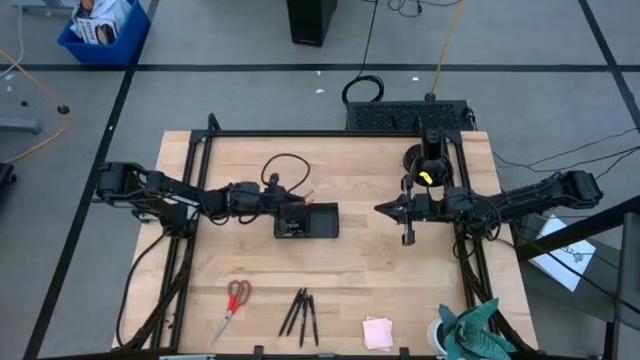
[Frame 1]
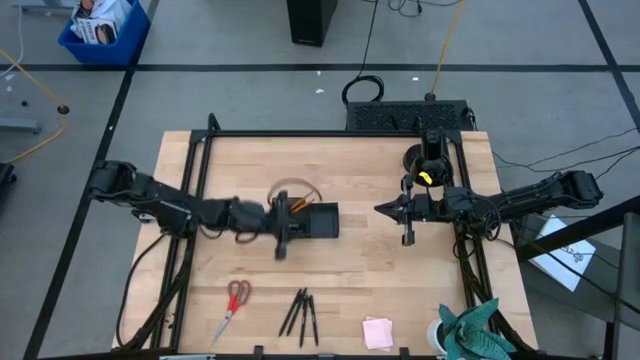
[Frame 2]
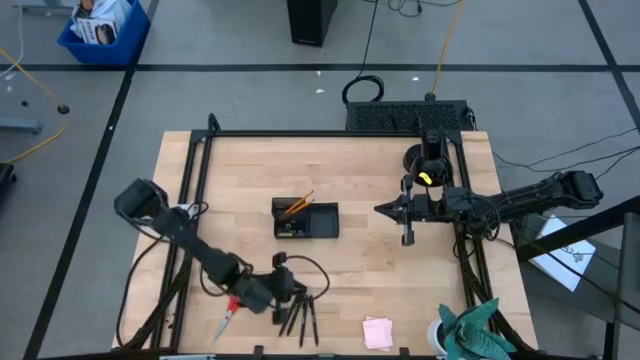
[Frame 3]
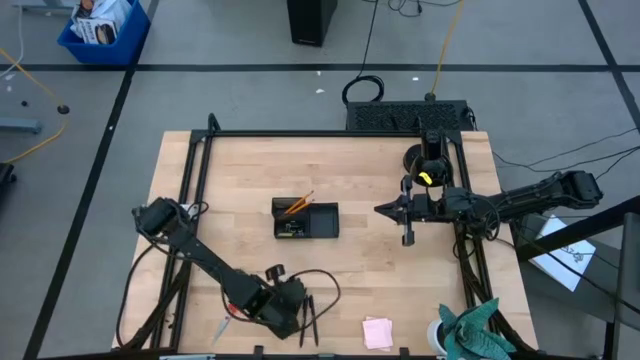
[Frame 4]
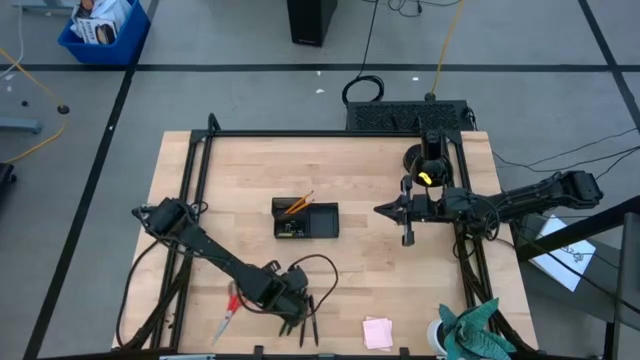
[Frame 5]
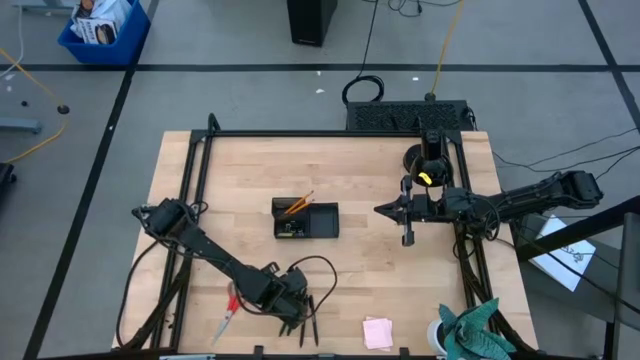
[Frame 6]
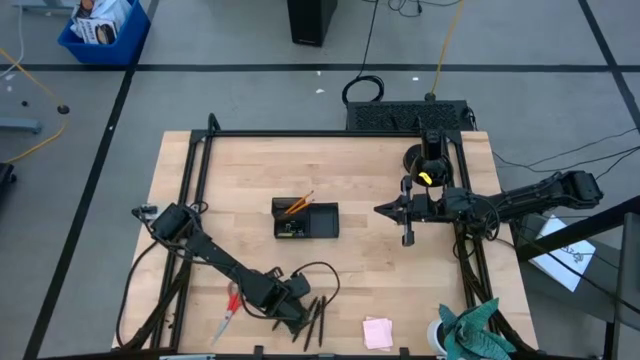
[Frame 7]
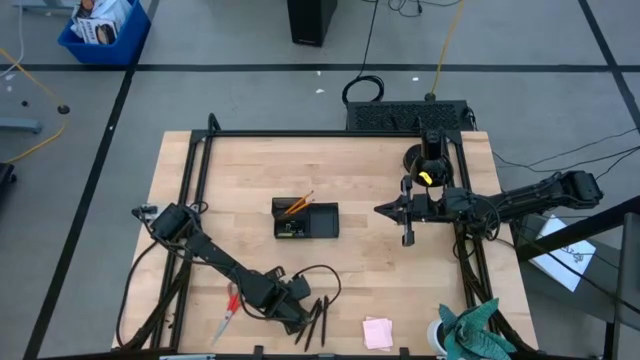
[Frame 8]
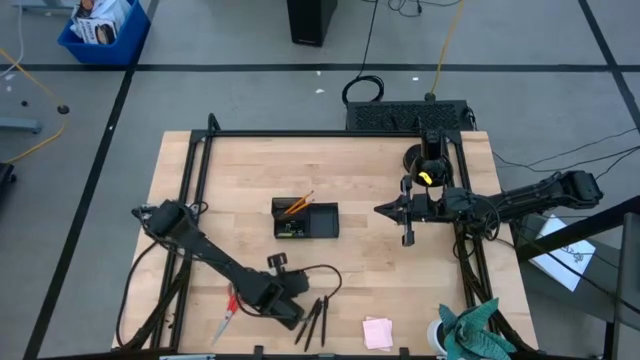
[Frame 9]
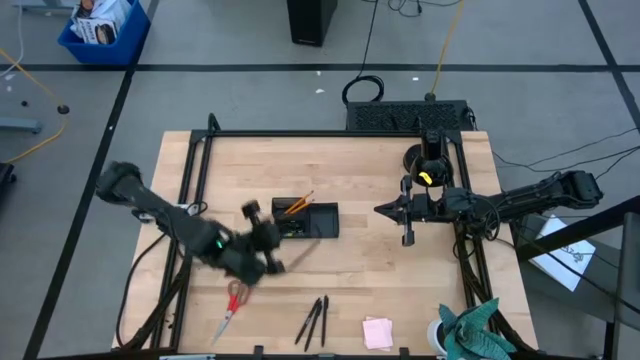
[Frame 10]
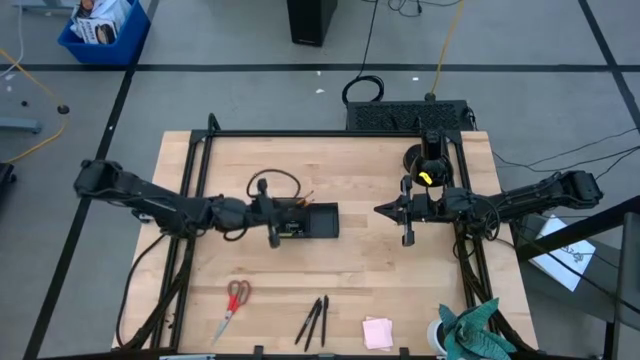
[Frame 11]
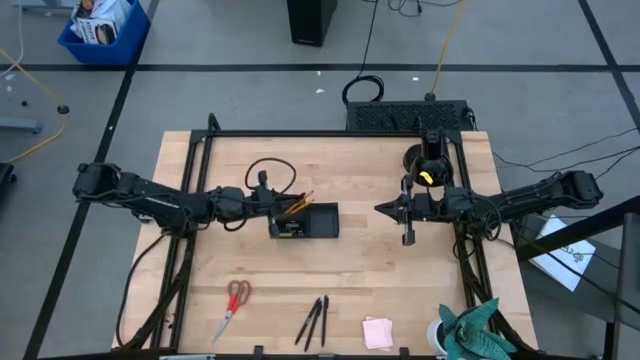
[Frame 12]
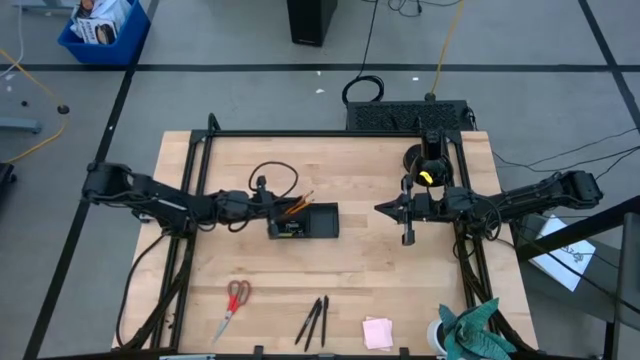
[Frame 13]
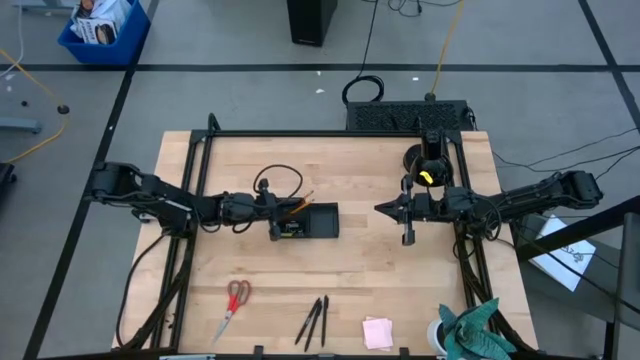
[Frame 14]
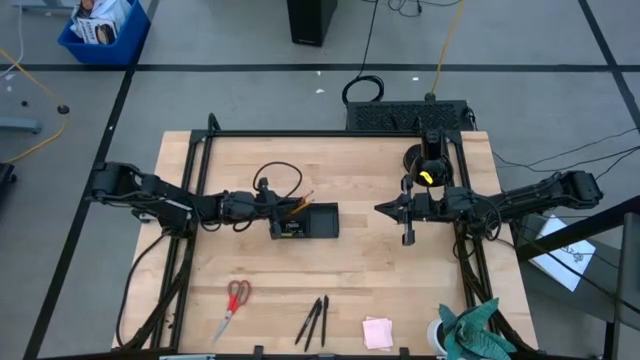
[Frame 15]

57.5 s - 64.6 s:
Task: Pick and place office supplies into organizer
Put the black pen into the black desk organizer

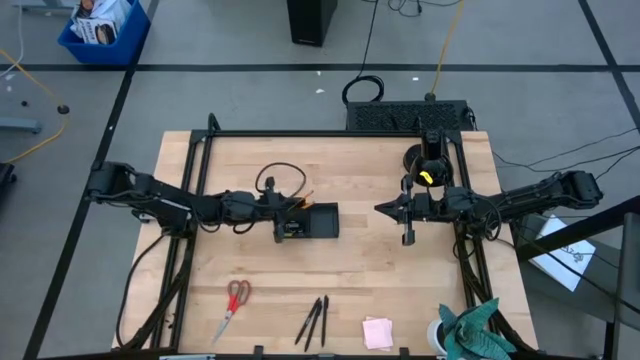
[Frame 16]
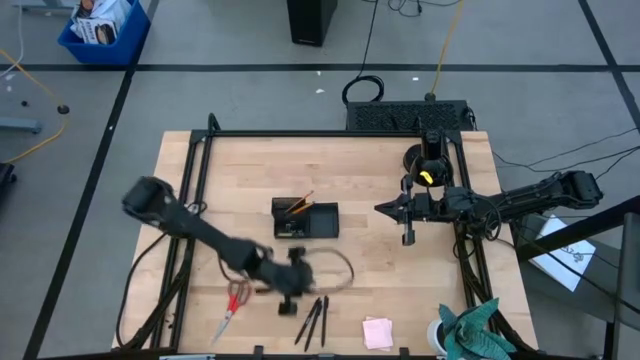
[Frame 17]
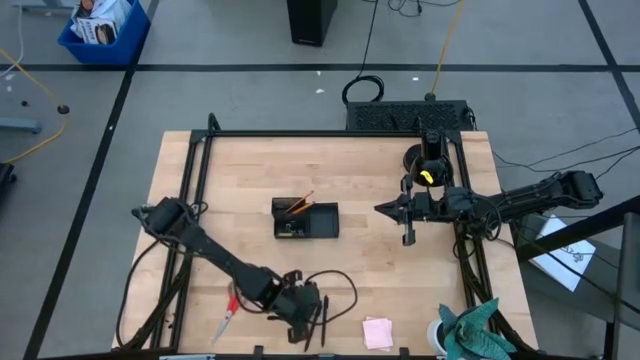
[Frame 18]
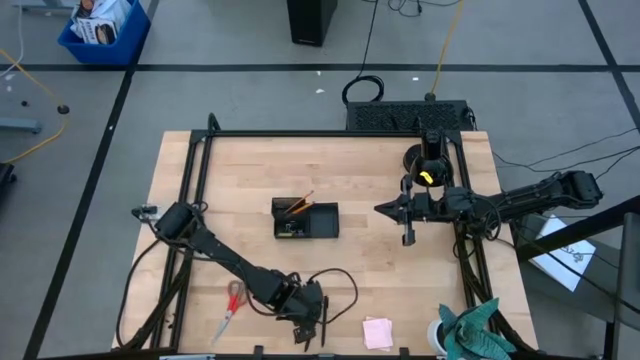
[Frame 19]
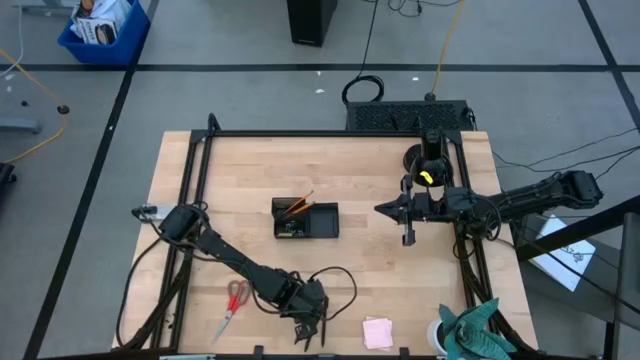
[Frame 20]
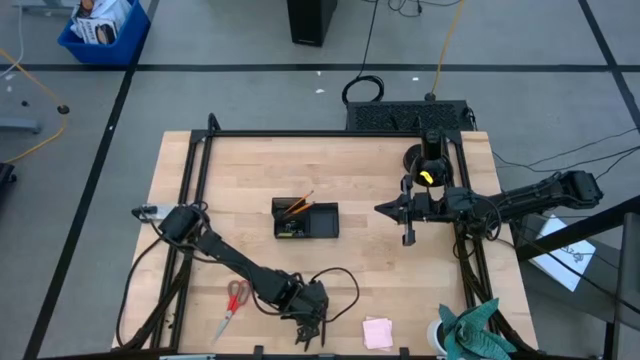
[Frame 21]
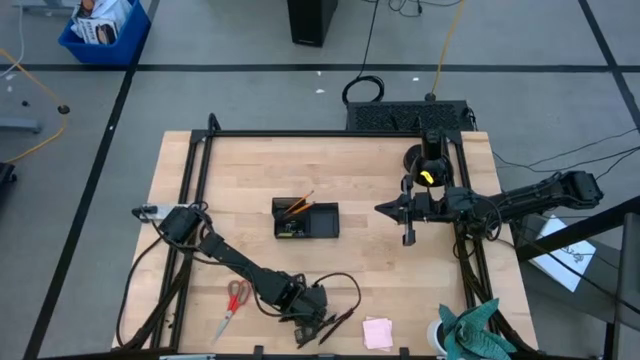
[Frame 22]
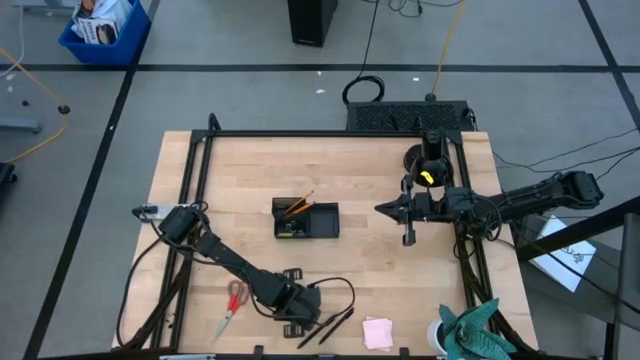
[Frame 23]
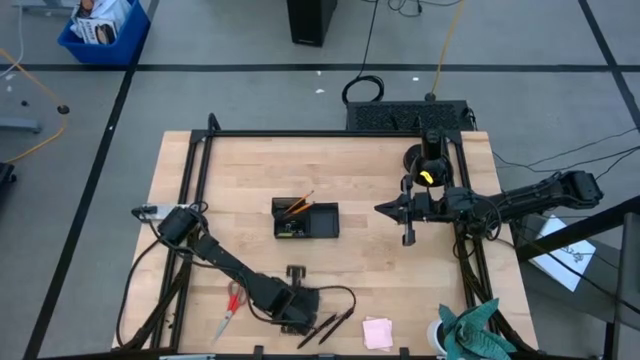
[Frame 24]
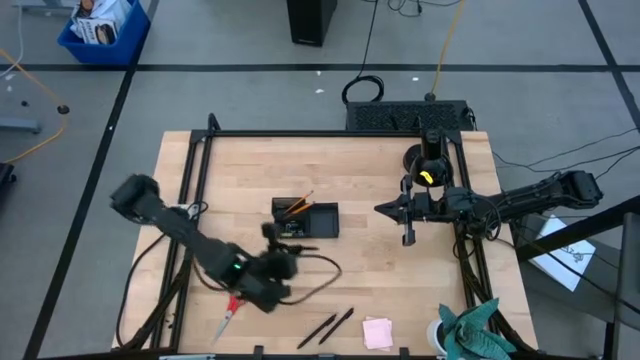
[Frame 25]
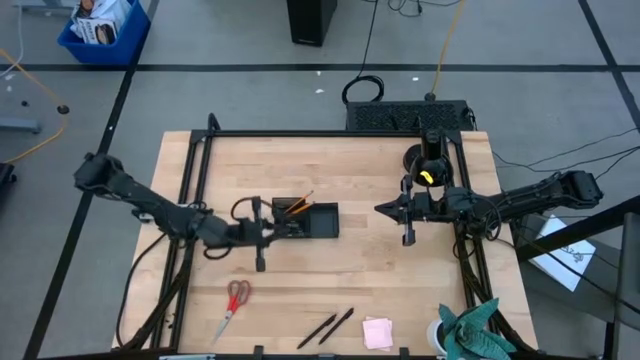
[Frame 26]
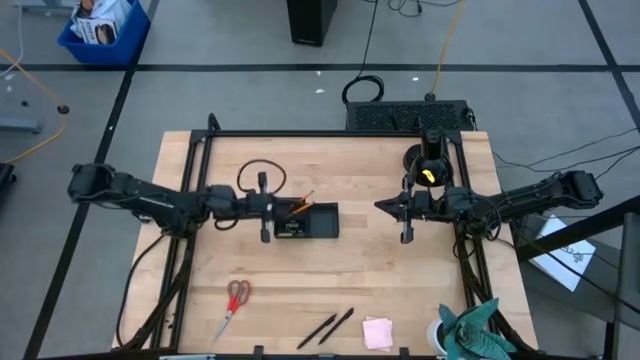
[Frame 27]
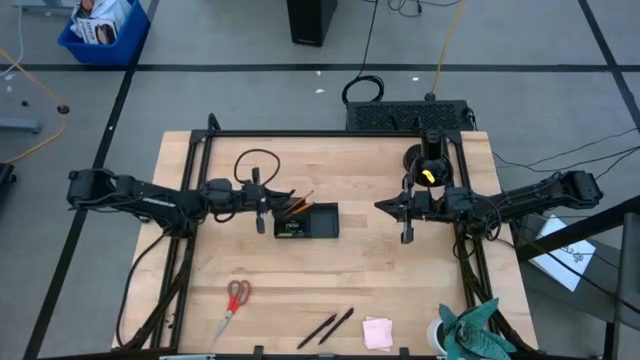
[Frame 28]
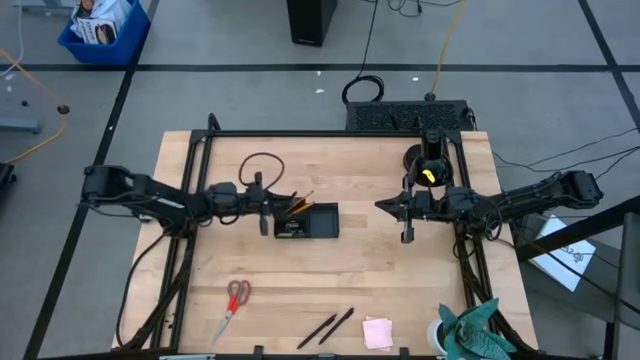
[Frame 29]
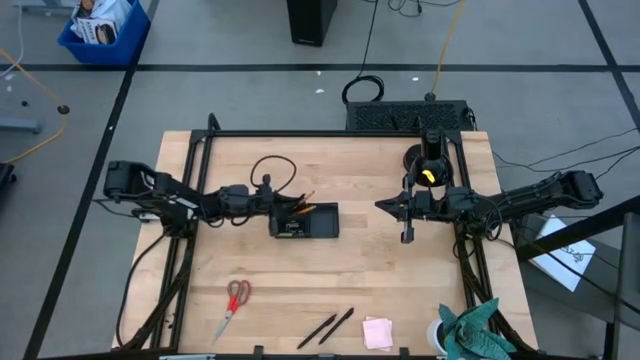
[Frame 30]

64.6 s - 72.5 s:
Put the black pen into the black desk organizer

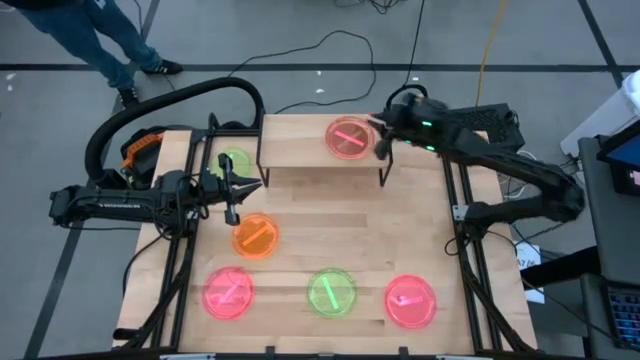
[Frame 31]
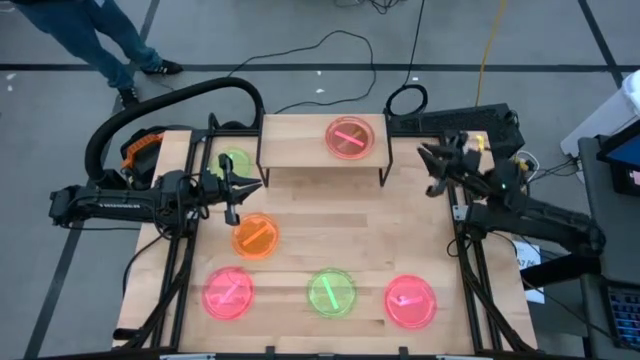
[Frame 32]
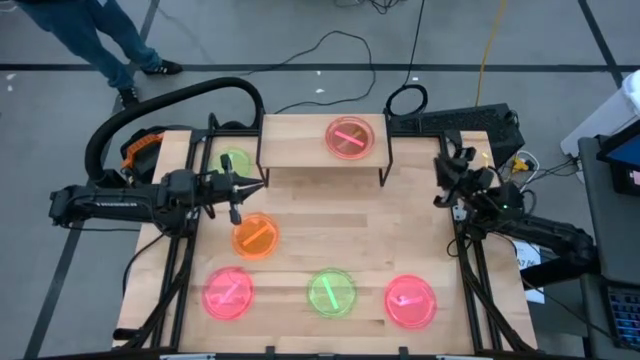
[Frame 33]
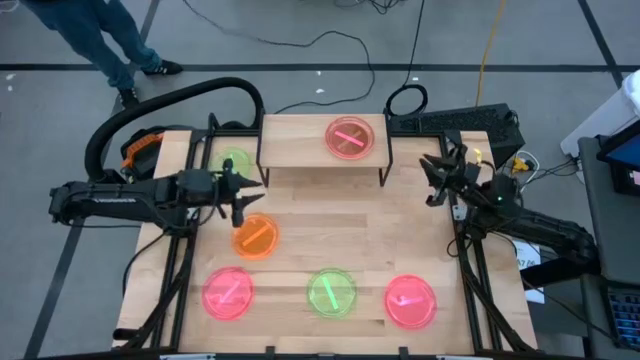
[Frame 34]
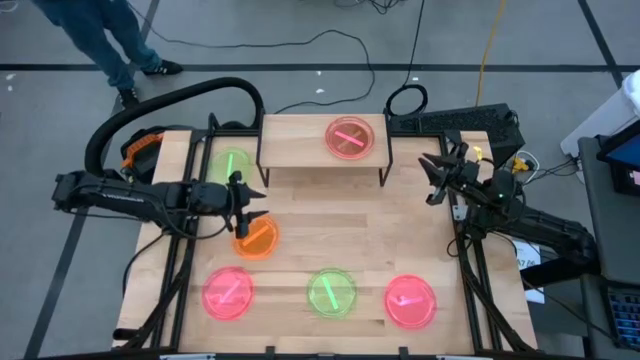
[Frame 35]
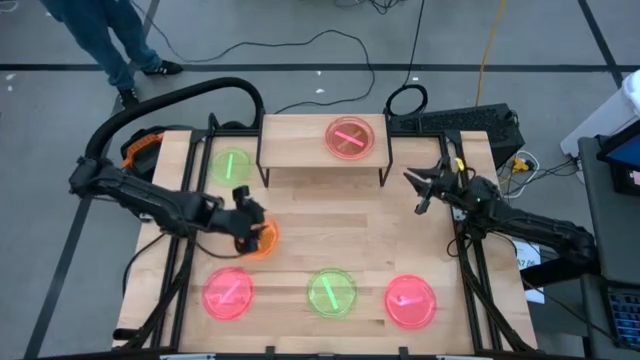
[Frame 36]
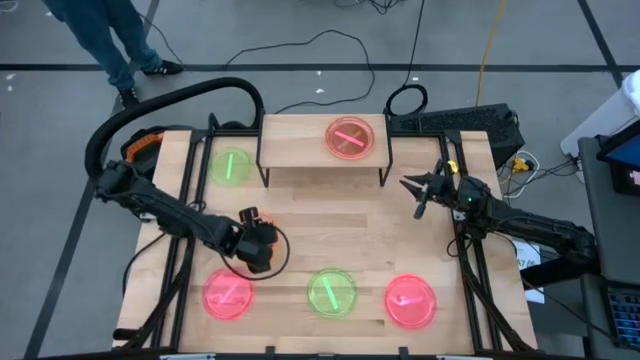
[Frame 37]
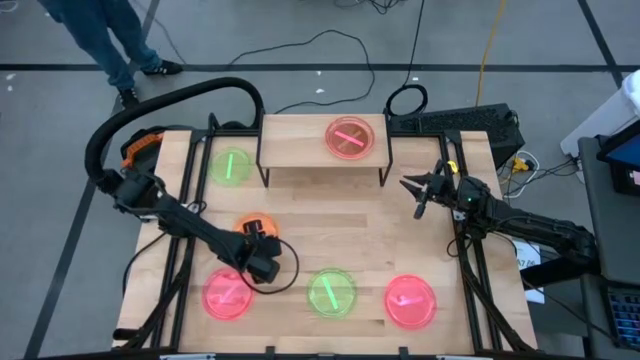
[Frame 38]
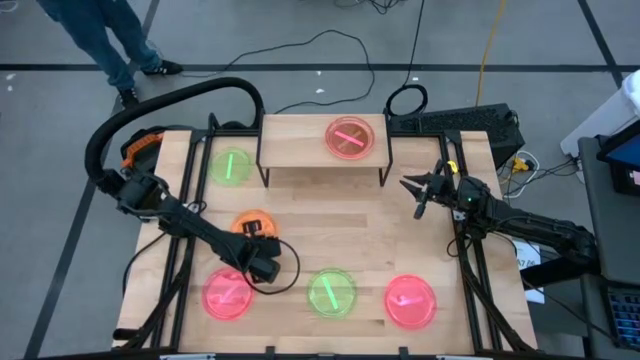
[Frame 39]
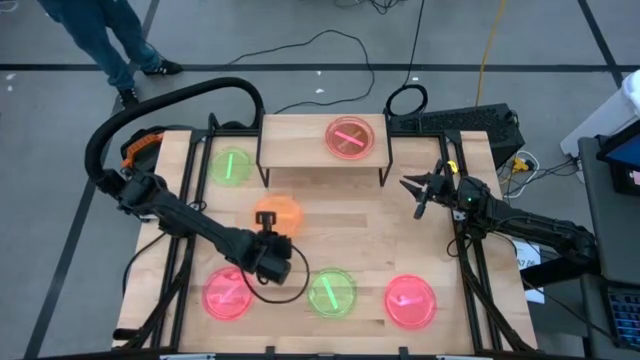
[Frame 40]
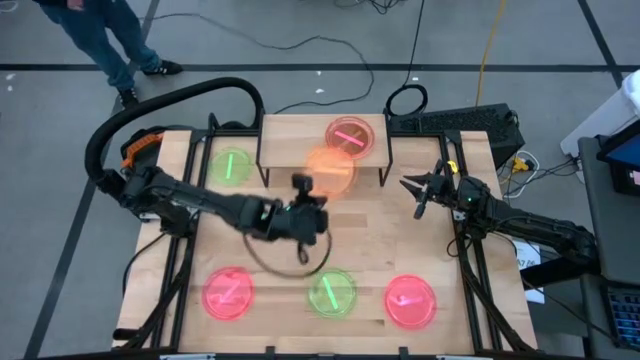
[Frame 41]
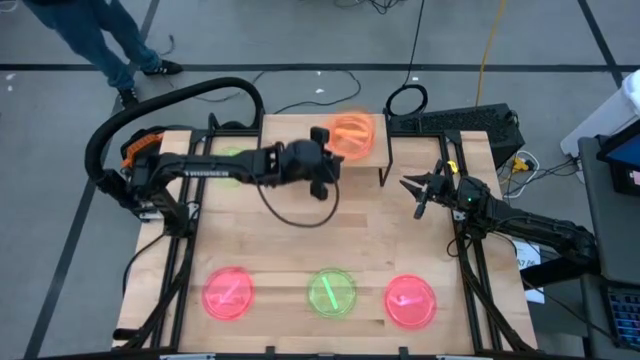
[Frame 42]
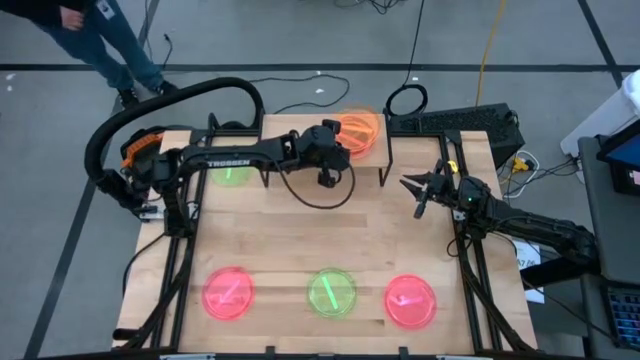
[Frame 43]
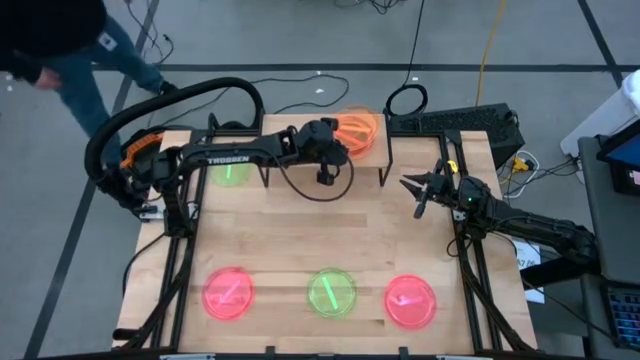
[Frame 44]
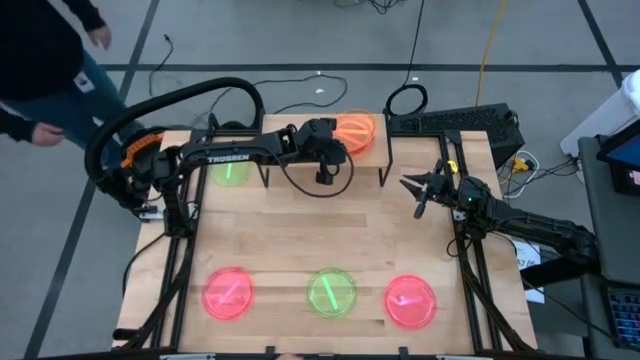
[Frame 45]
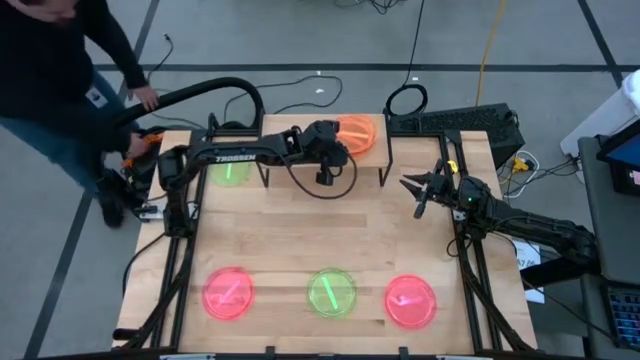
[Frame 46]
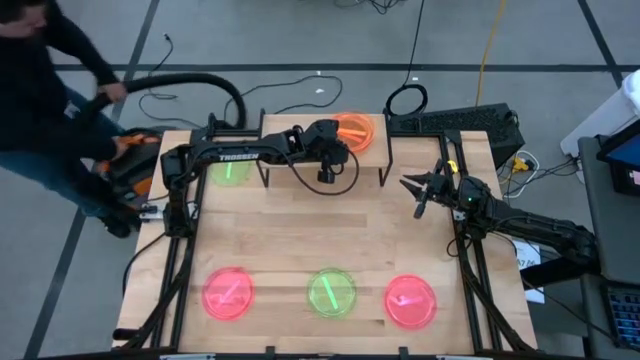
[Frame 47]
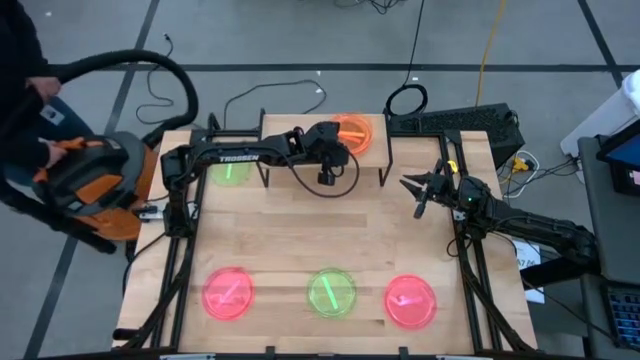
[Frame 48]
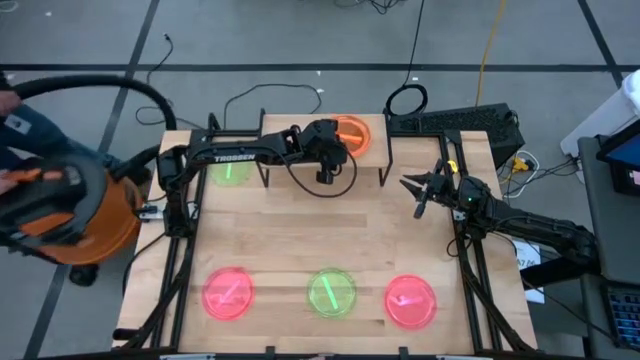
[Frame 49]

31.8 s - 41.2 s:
Task: Place and stack plates onto a shelf
Stack the orange plate on top of the pink plate on the shelf
